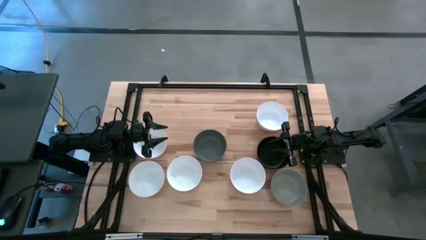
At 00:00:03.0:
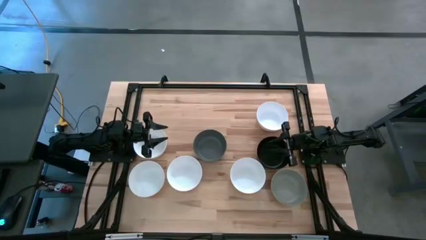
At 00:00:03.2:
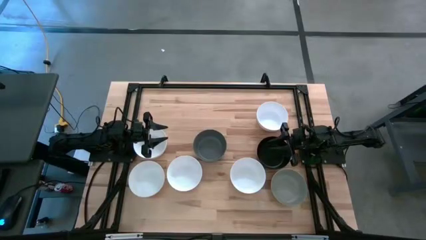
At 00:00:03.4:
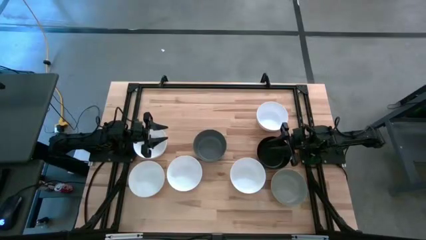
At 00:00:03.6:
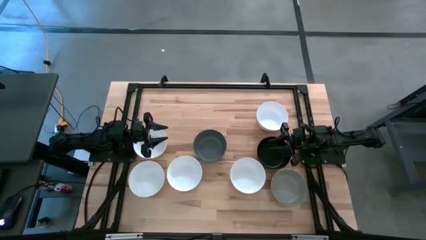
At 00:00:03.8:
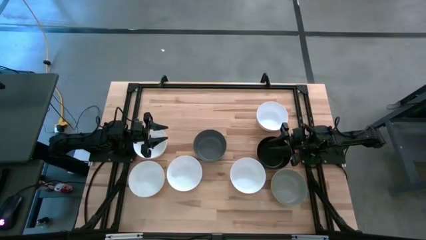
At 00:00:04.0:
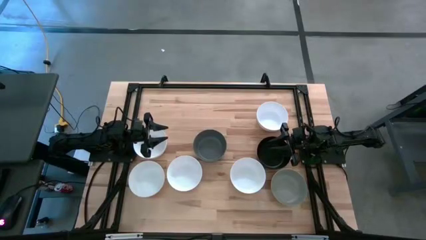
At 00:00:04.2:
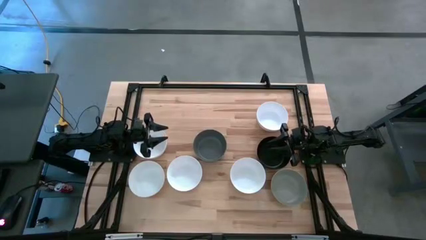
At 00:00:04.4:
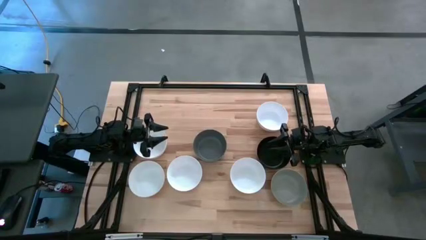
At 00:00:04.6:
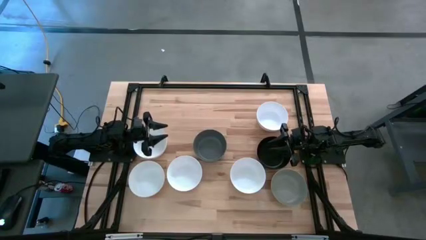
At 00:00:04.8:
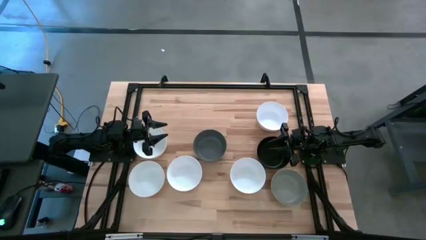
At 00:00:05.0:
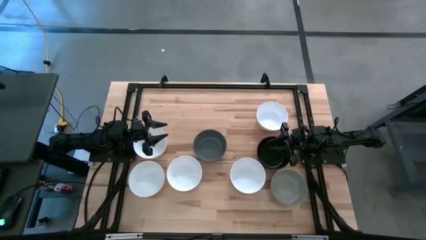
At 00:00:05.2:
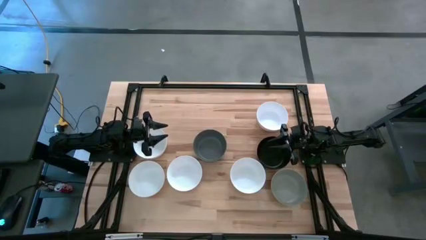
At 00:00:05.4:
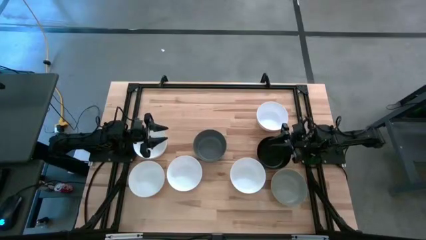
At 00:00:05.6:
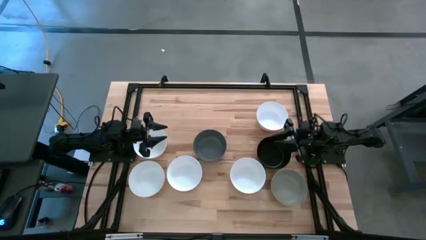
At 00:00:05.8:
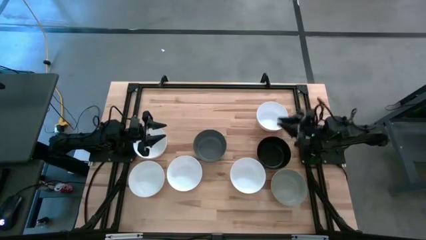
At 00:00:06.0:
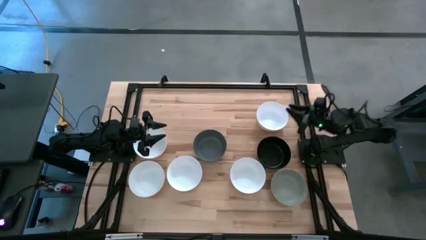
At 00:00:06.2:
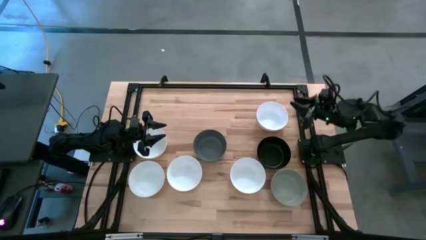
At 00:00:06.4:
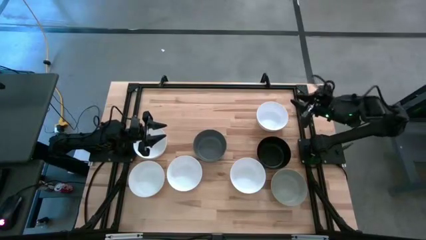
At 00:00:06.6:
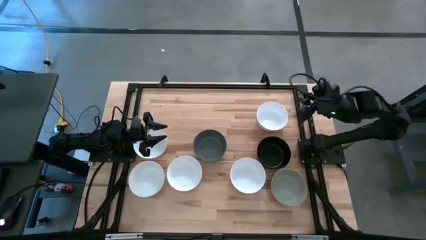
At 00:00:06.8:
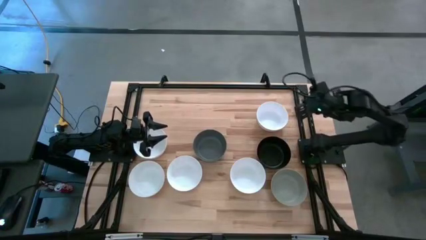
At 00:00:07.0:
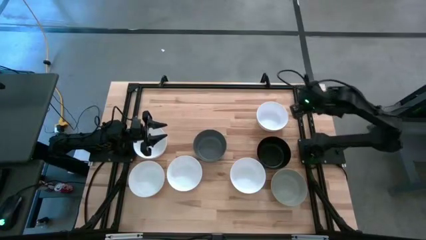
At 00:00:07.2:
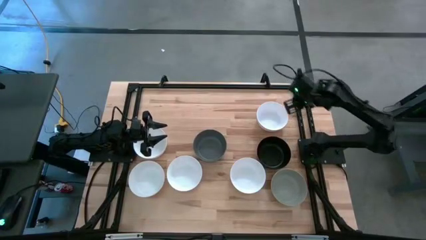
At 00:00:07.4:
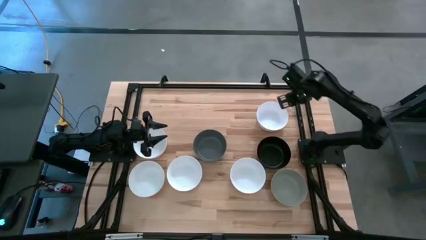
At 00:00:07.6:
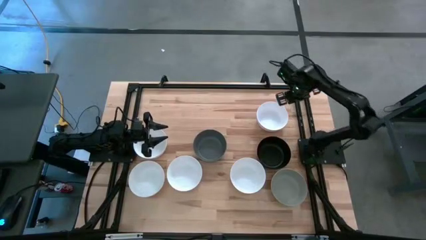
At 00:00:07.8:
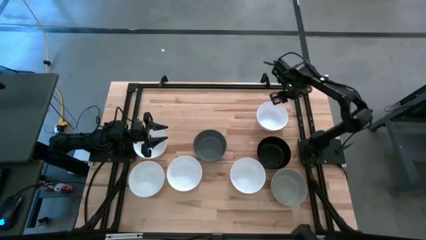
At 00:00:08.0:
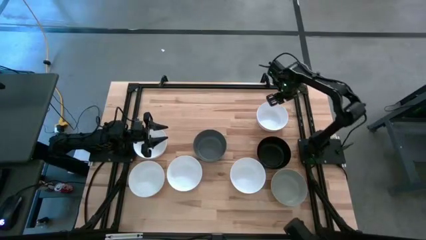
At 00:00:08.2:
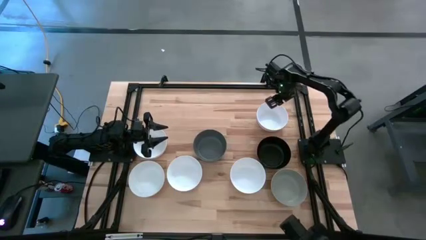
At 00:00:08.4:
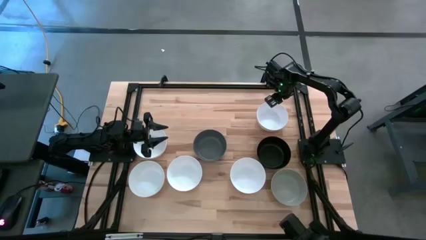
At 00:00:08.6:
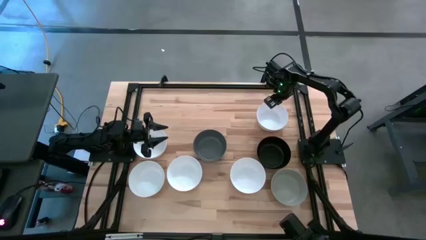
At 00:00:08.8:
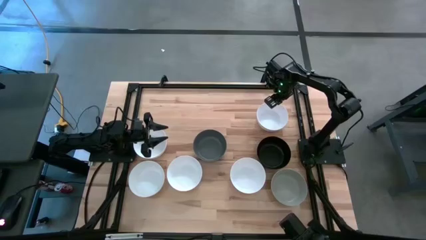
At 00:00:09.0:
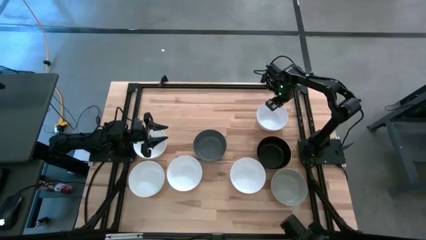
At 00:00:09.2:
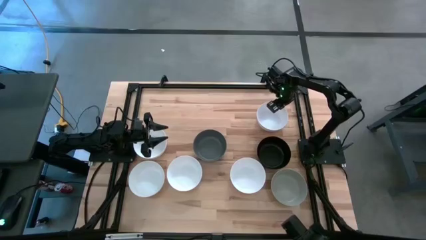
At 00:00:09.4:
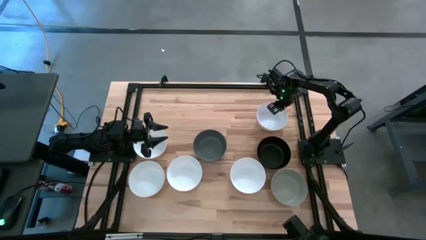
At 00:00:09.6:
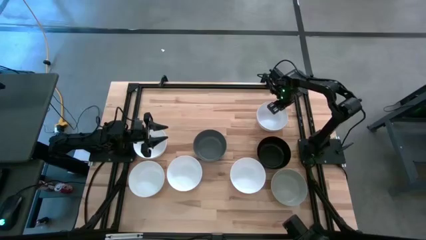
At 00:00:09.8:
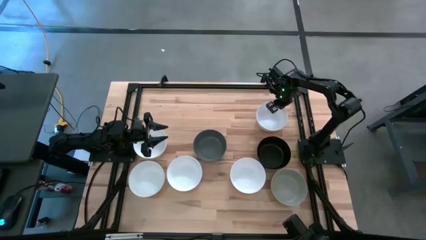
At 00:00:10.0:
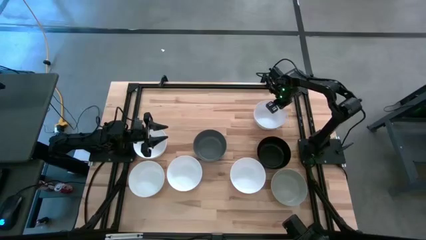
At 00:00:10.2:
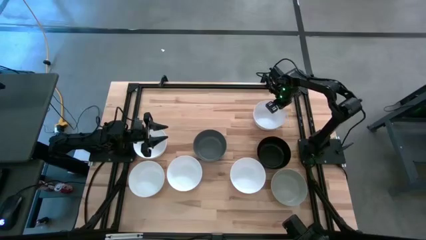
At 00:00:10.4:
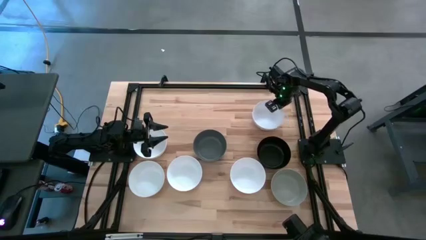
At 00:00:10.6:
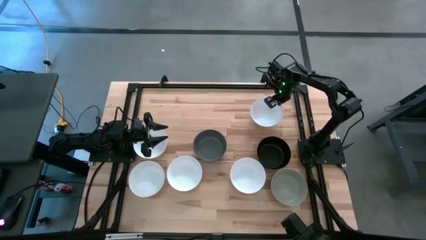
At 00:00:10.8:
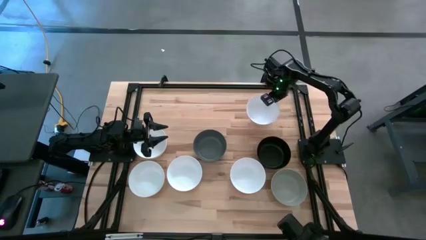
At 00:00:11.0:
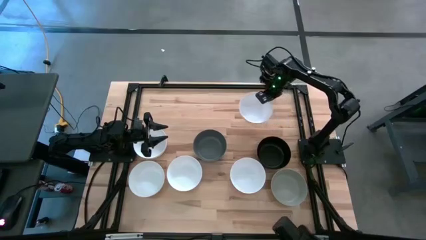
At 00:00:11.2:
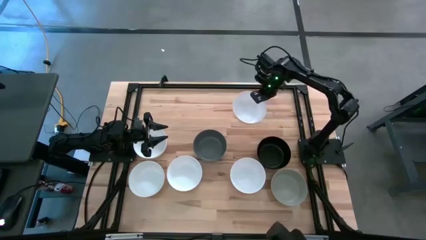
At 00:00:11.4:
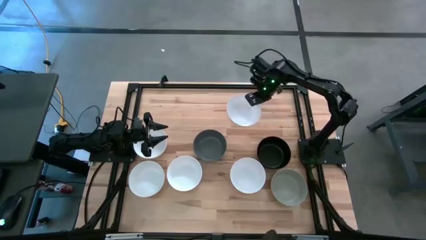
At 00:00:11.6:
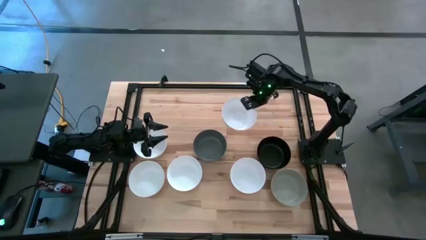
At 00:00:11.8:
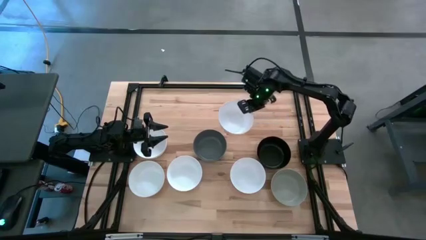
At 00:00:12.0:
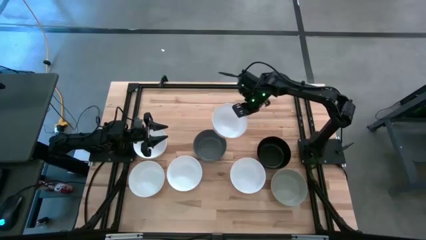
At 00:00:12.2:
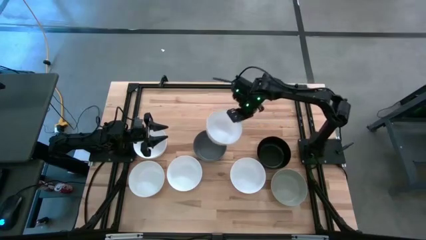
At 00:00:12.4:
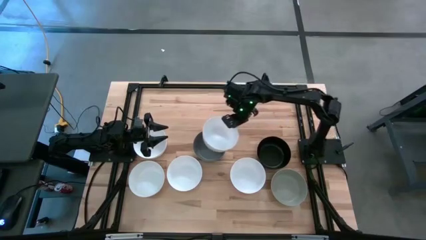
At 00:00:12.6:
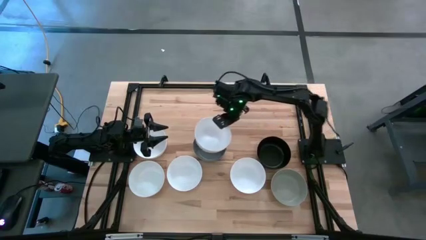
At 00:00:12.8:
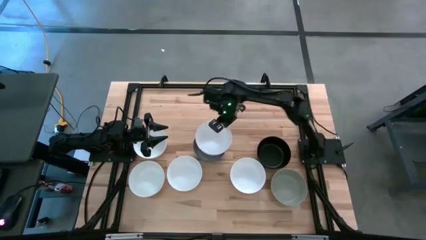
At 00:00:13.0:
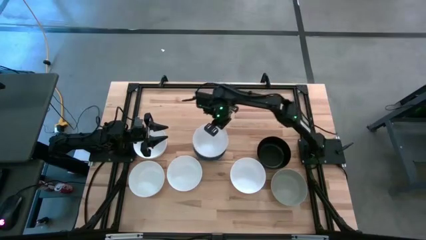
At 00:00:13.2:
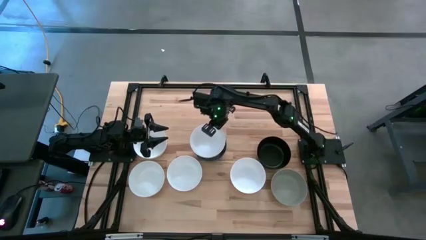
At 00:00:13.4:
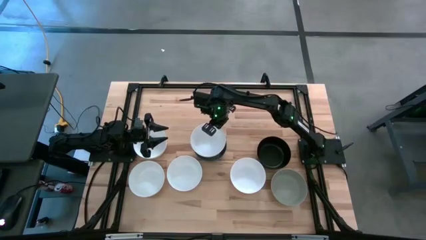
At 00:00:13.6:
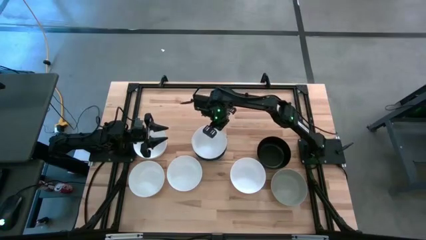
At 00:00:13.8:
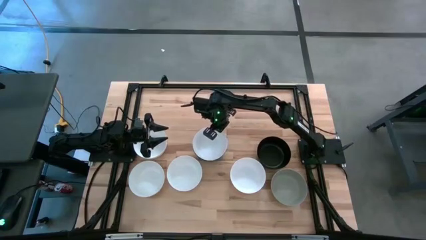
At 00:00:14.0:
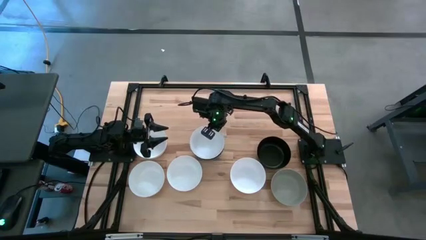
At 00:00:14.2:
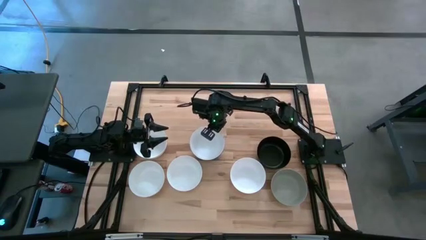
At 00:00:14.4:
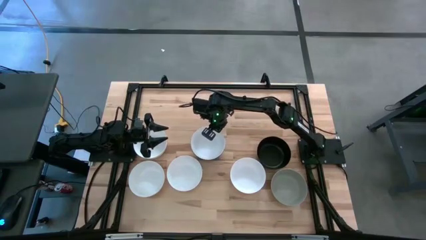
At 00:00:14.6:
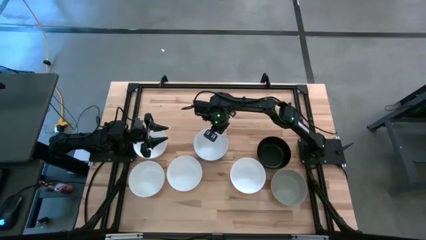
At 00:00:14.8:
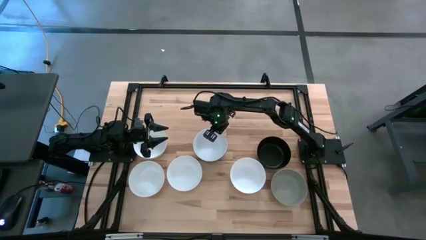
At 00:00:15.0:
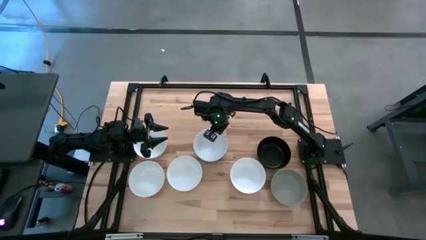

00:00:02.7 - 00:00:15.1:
Task: Nest bowls inside each other
Stack the white bowl on top of the dark gray bowl

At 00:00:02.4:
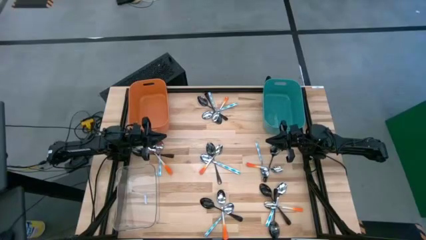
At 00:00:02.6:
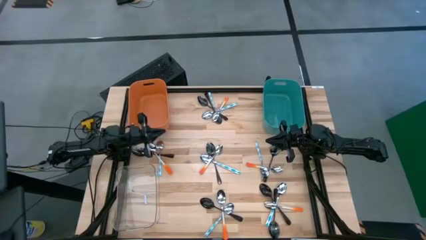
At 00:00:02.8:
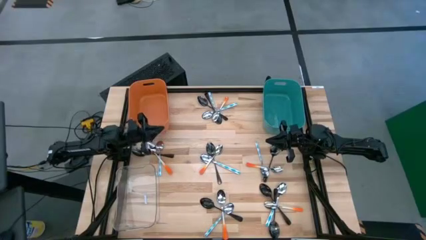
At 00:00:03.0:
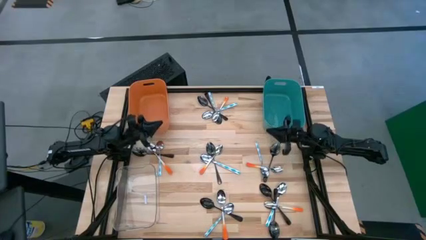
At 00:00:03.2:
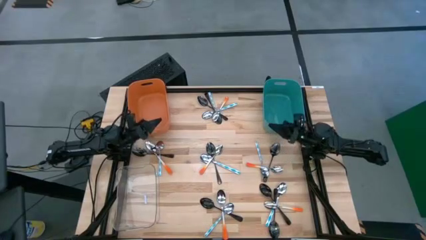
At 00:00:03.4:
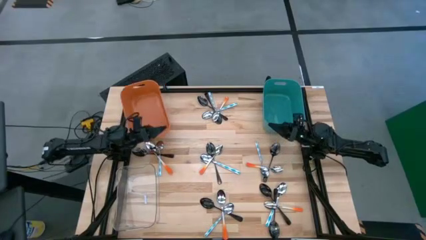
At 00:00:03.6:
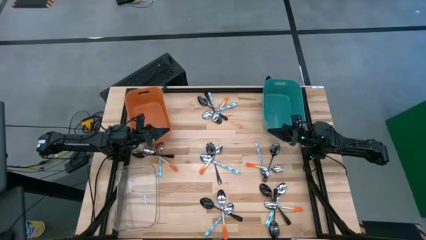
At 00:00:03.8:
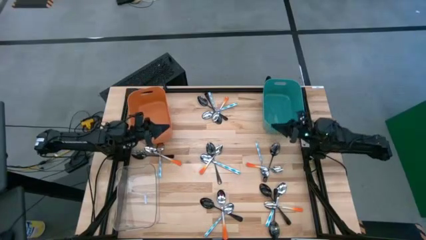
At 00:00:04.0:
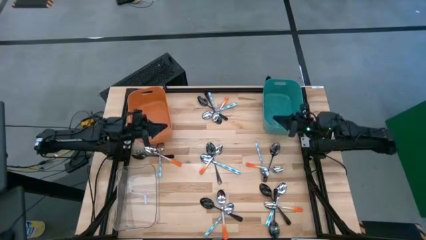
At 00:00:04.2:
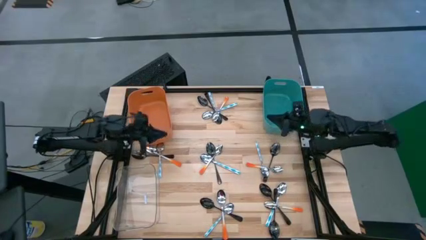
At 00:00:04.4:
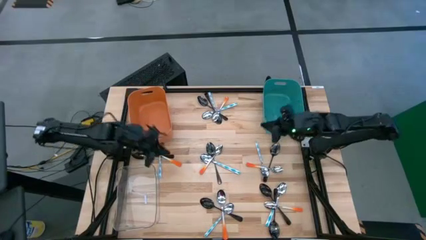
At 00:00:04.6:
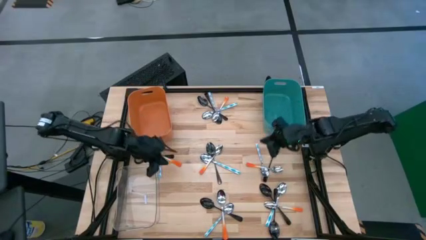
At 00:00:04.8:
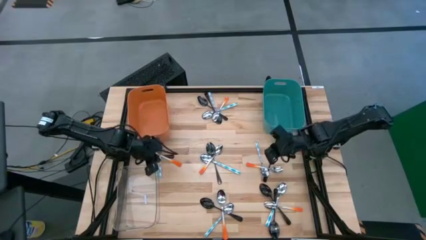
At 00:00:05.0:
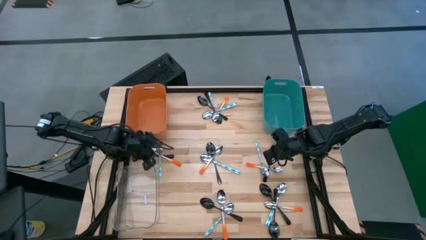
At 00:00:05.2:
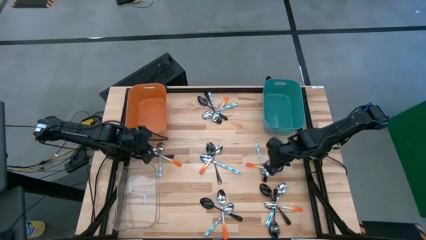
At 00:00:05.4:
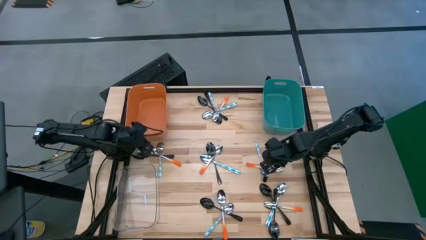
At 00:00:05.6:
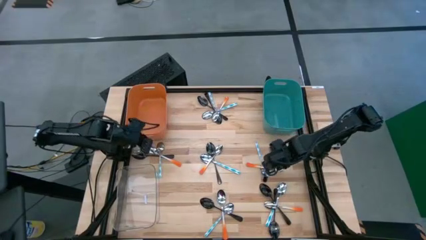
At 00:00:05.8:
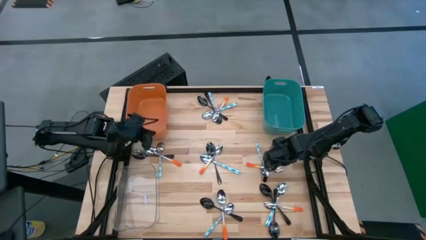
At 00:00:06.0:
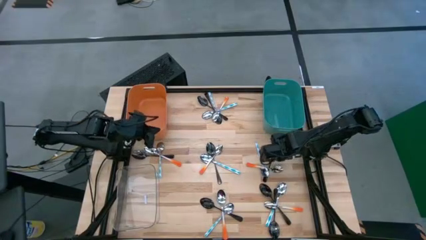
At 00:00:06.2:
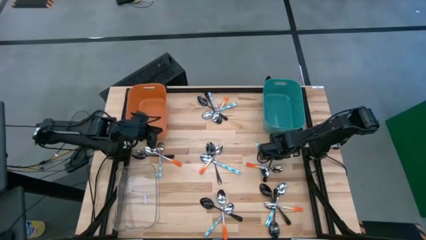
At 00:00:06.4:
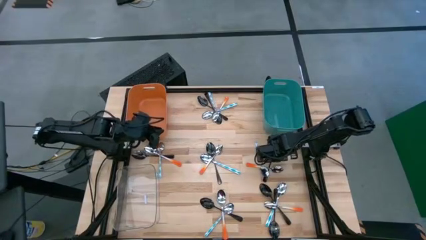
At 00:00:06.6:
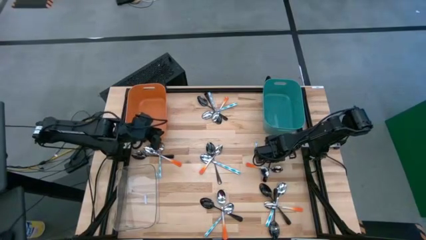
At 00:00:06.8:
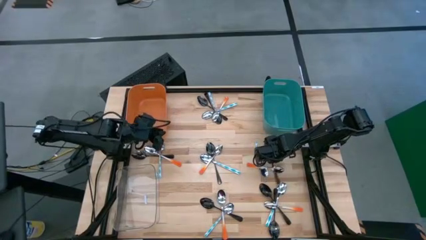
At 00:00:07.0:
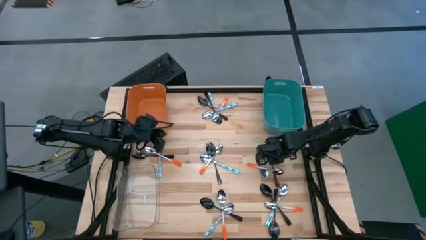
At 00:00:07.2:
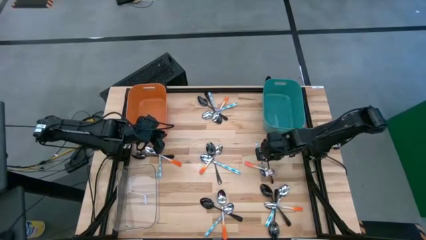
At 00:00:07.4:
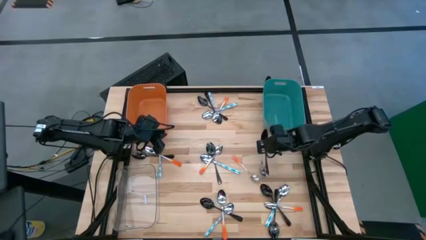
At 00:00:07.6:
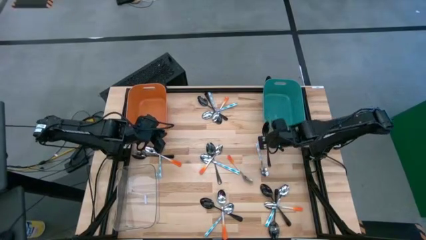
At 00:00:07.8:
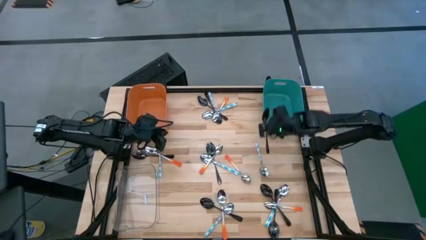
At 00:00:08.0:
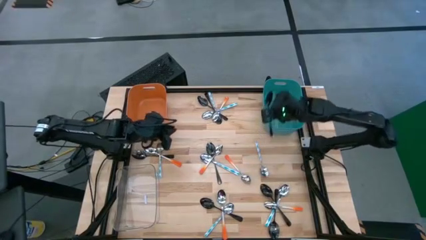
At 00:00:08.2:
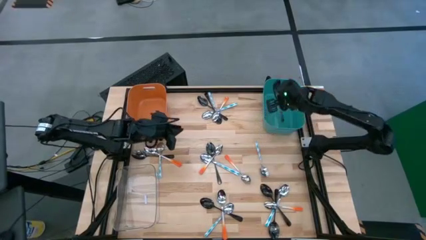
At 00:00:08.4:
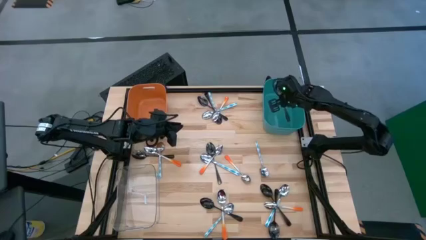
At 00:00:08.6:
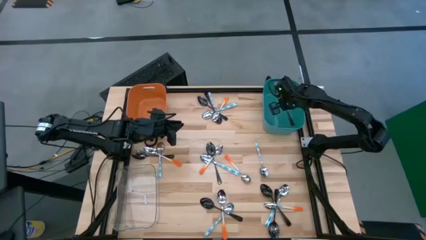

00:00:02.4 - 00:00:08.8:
Task: Sort silverware by color (type)
Put the black spoon into the green bin
